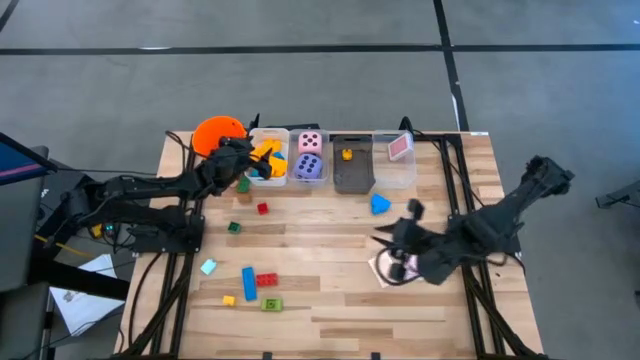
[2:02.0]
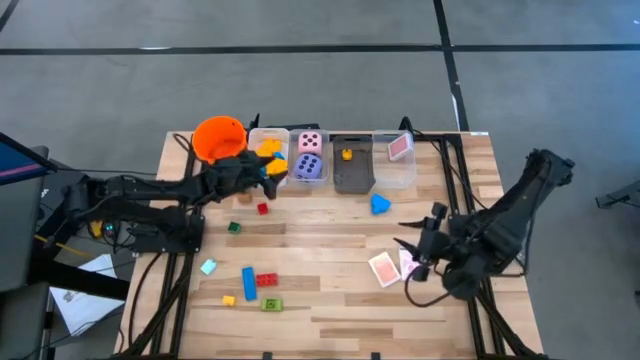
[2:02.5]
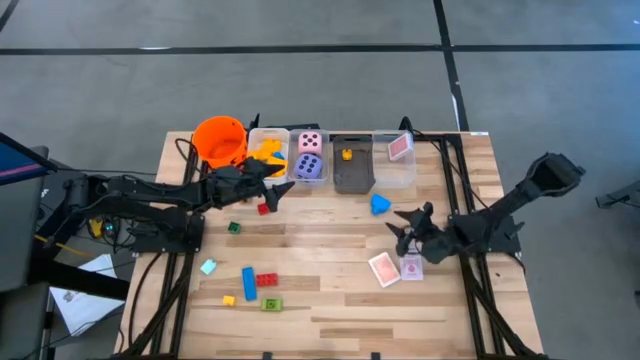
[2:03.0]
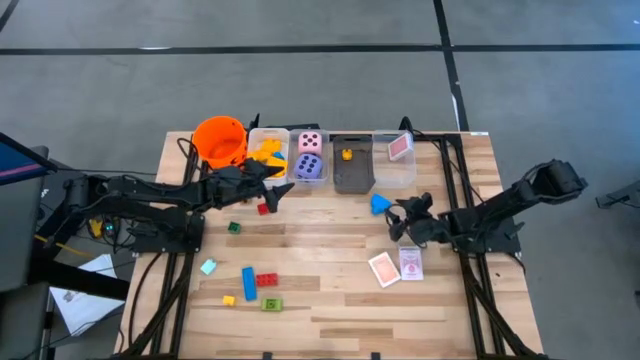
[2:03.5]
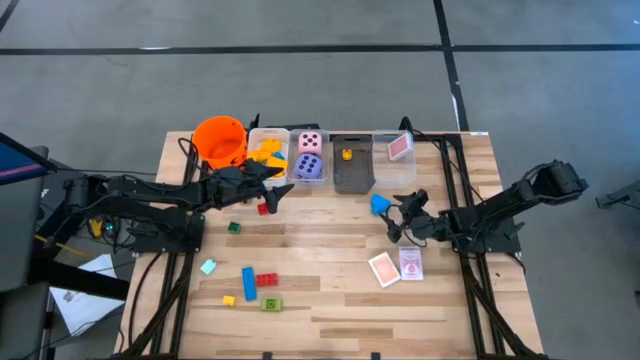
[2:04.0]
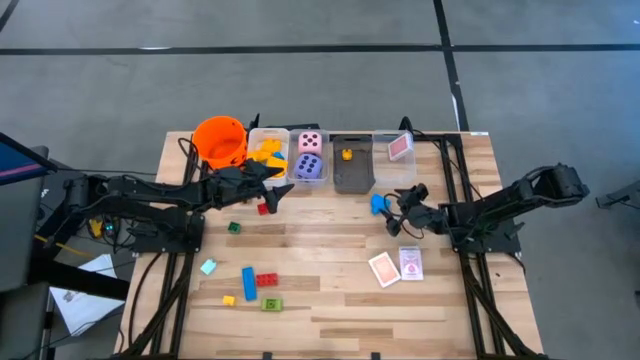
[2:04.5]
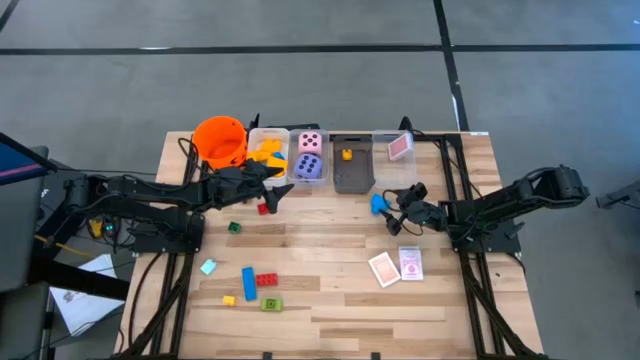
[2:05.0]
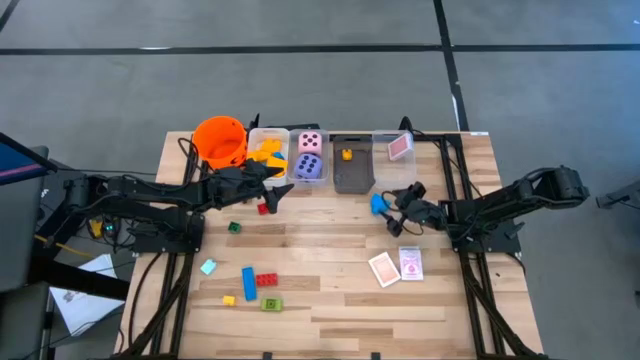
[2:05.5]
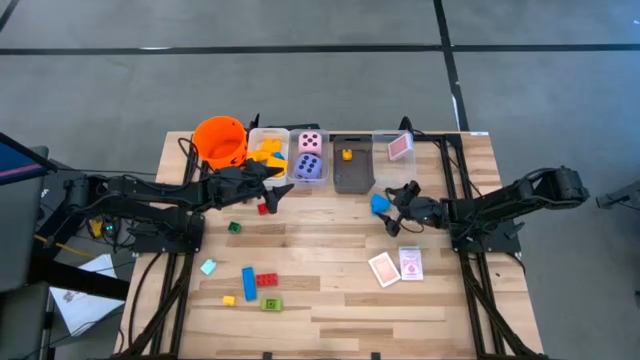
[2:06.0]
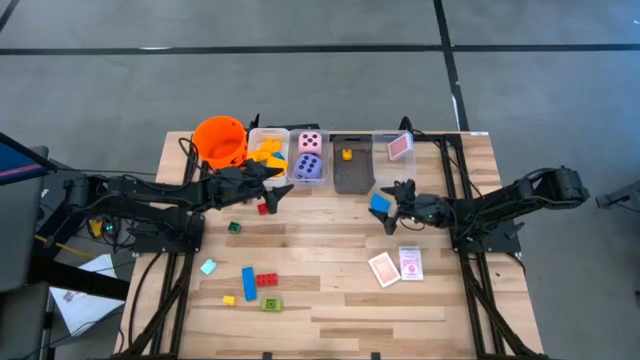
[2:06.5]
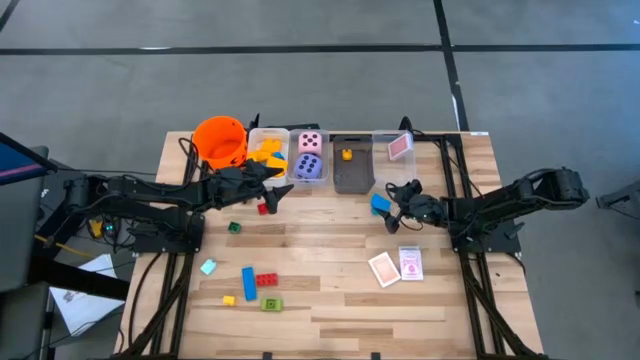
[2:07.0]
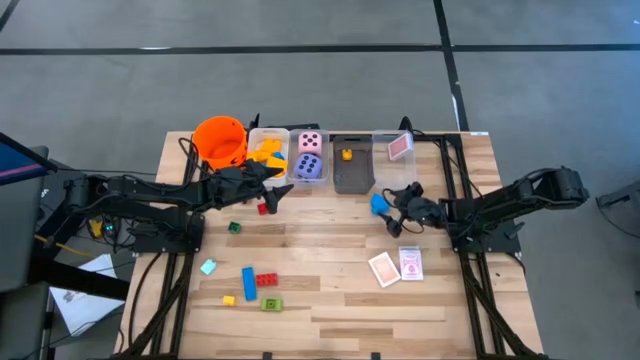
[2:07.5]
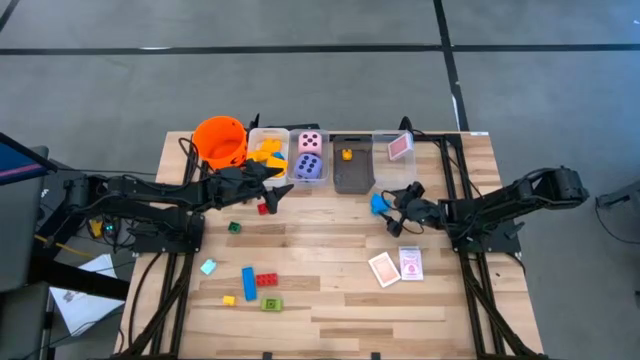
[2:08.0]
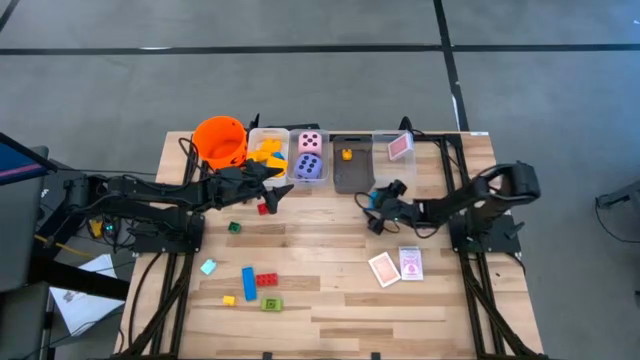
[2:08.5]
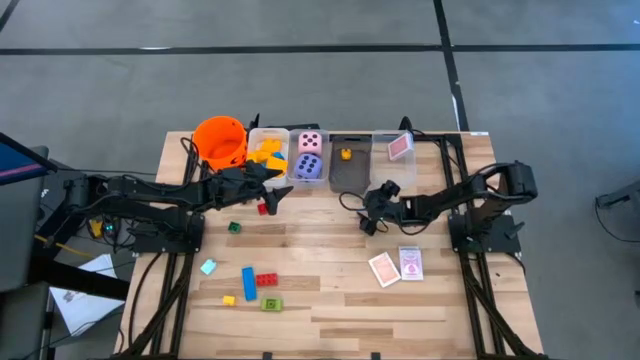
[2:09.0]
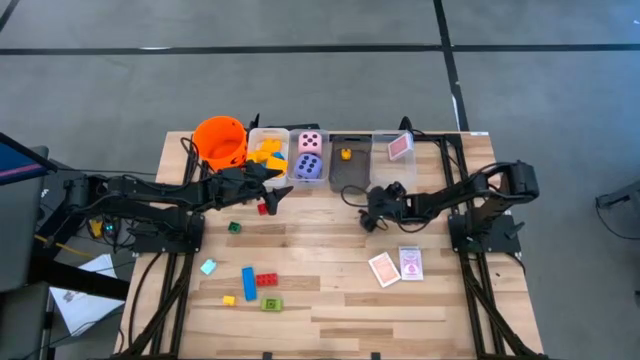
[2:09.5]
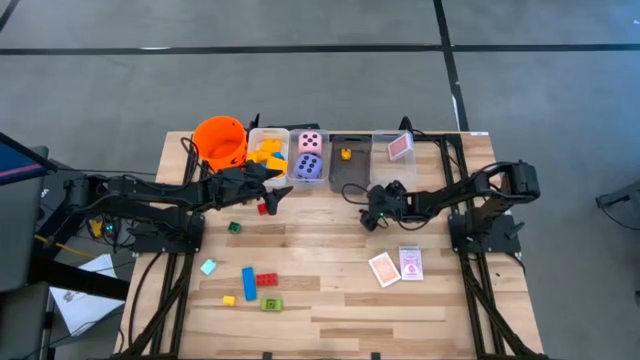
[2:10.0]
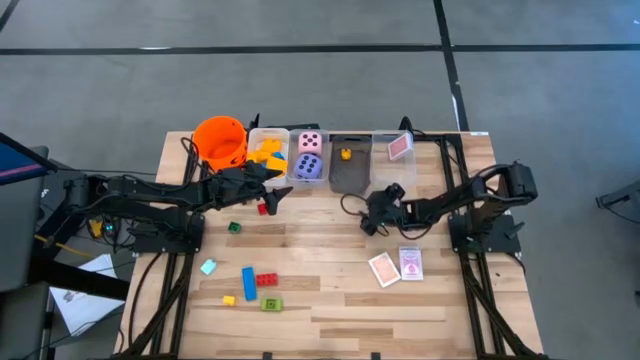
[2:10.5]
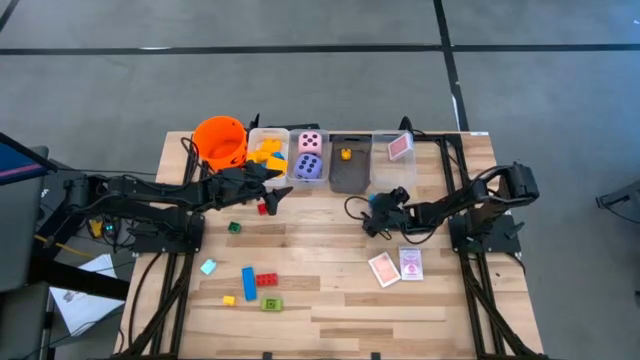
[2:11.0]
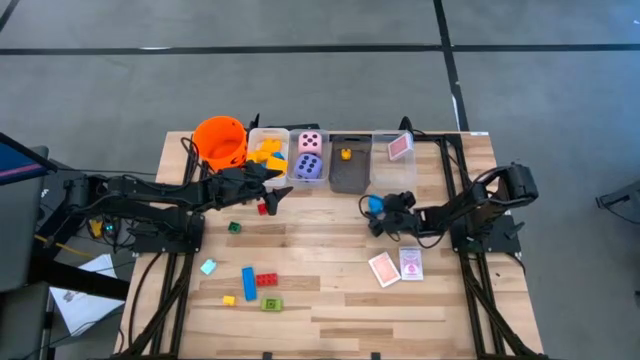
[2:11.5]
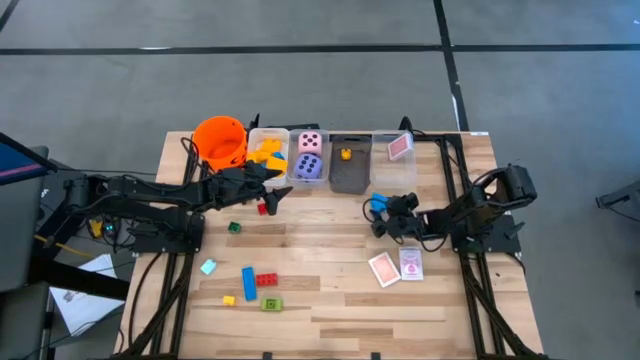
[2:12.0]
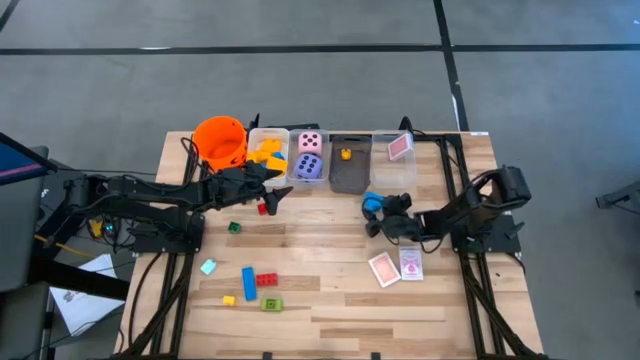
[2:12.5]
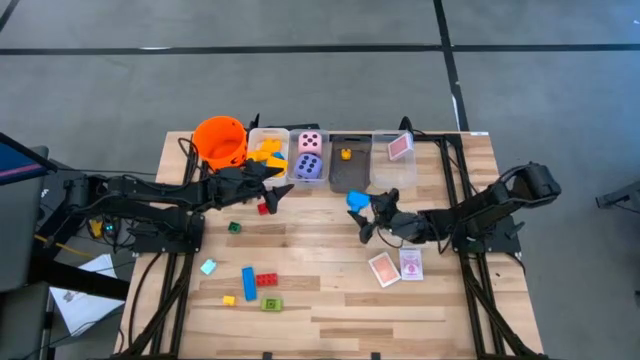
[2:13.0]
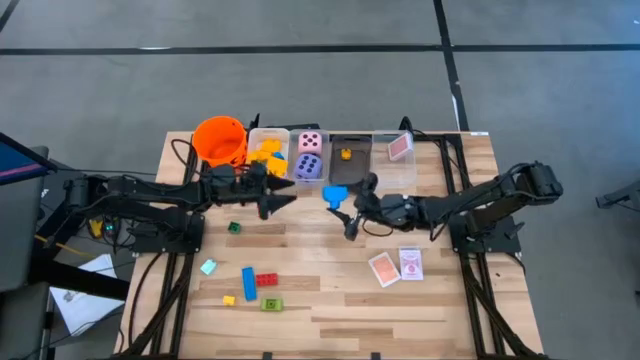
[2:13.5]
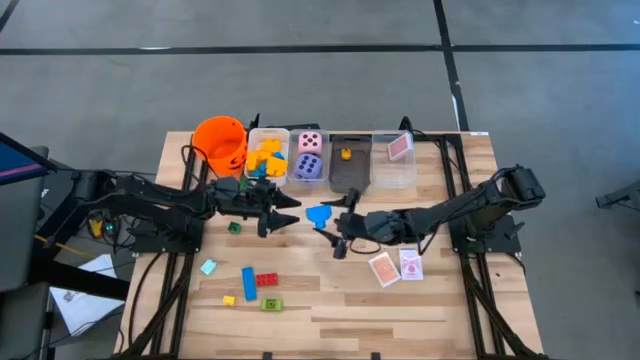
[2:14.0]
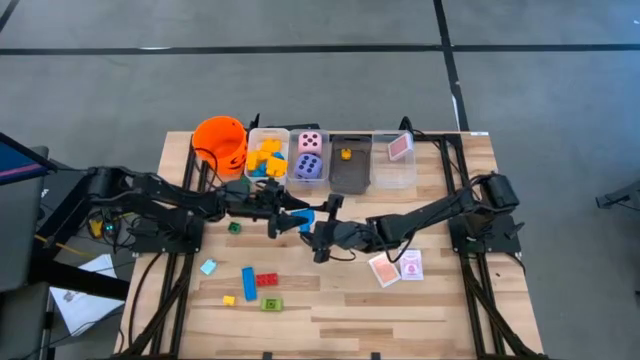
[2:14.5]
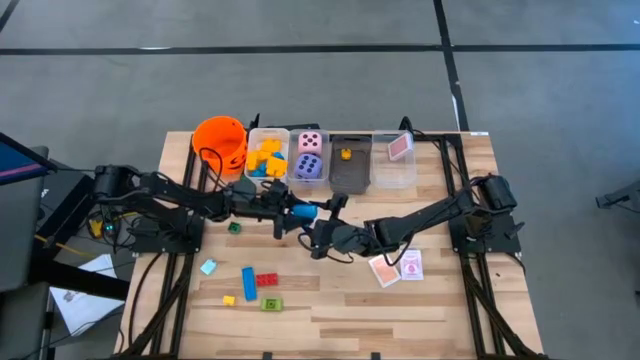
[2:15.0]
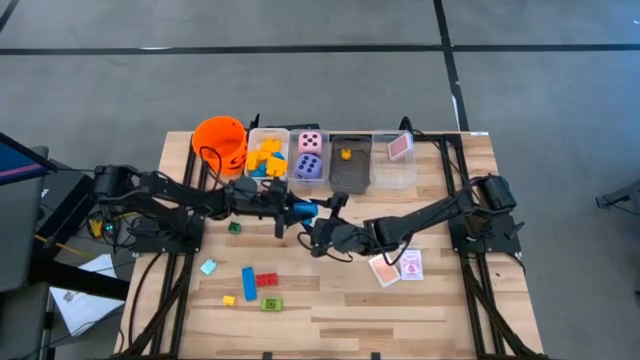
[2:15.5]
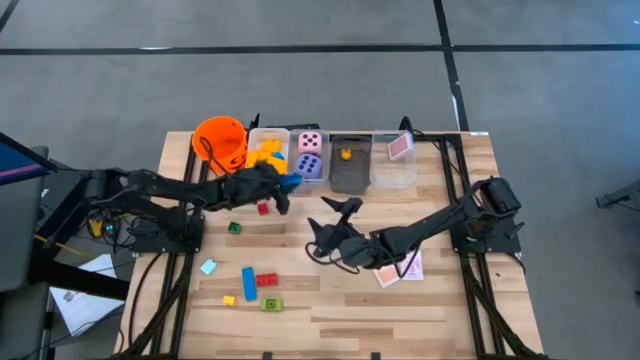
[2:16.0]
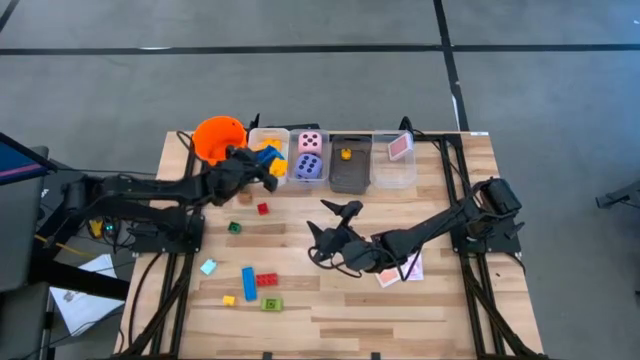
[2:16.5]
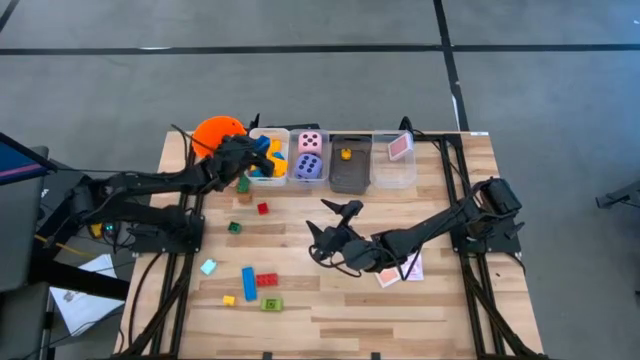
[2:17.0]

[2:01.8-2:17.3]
Task: Pick & Place Toys
Put the blue stud game piece into the white bin

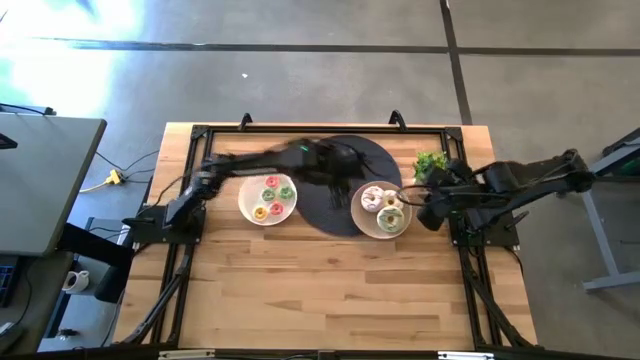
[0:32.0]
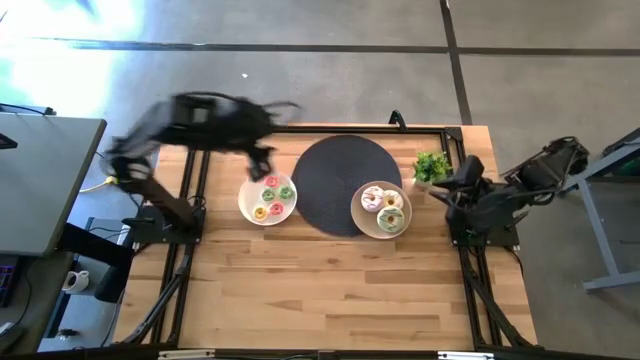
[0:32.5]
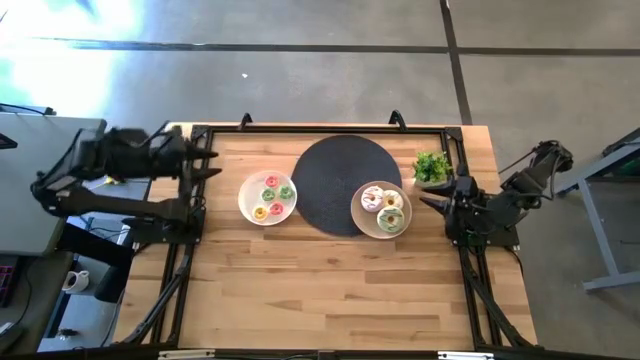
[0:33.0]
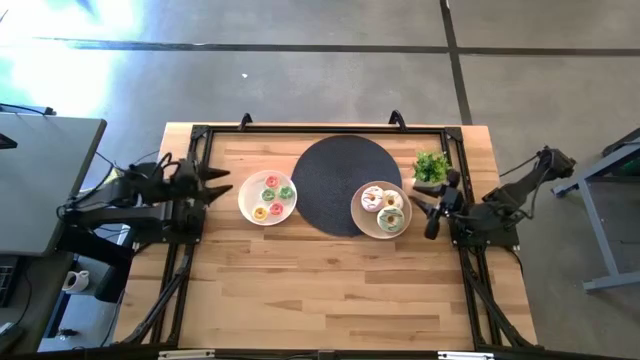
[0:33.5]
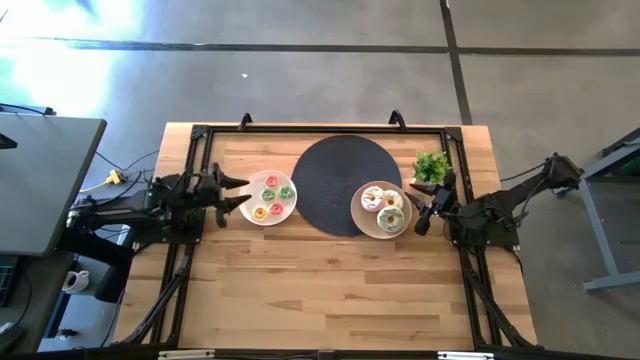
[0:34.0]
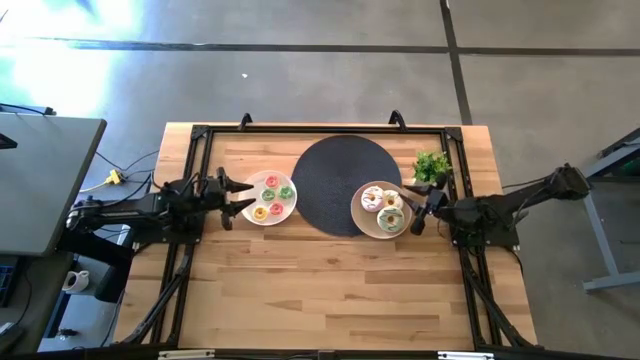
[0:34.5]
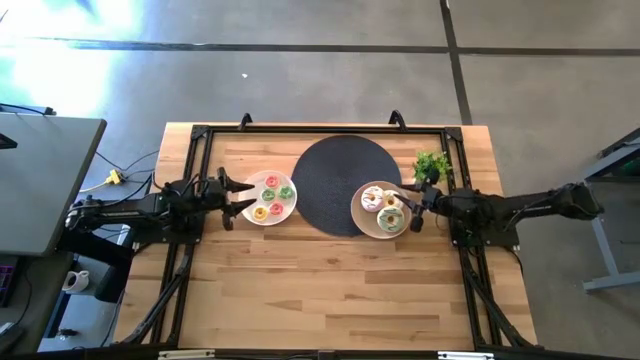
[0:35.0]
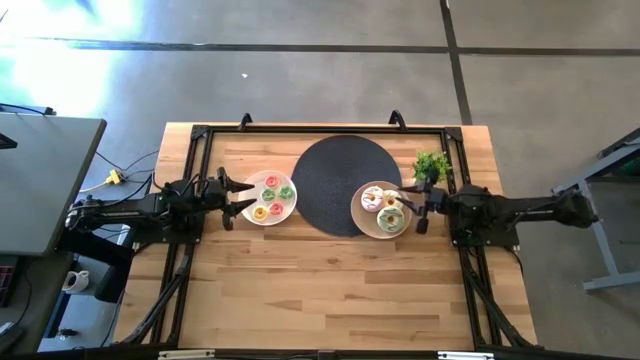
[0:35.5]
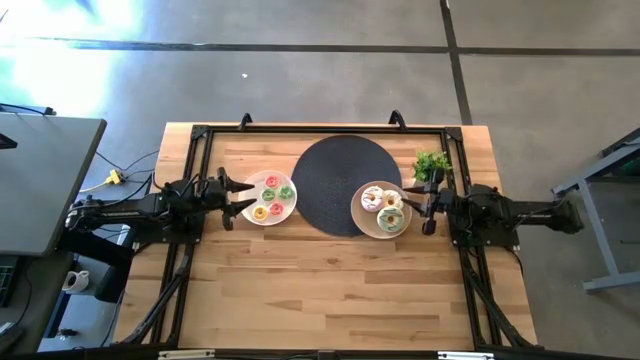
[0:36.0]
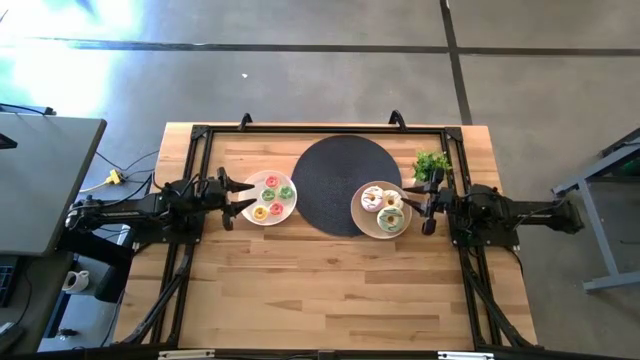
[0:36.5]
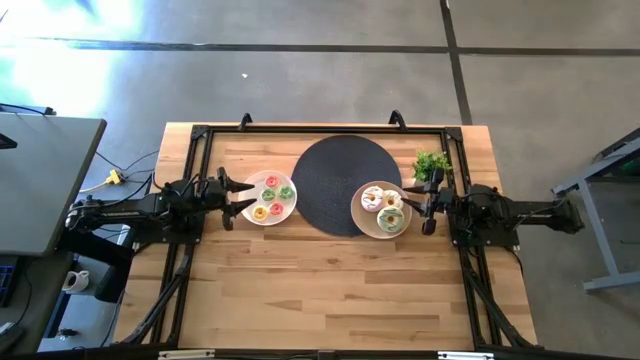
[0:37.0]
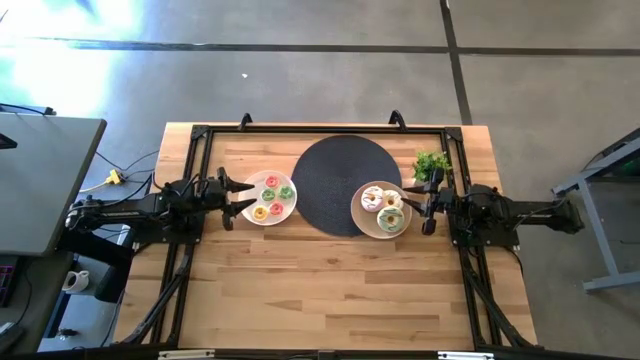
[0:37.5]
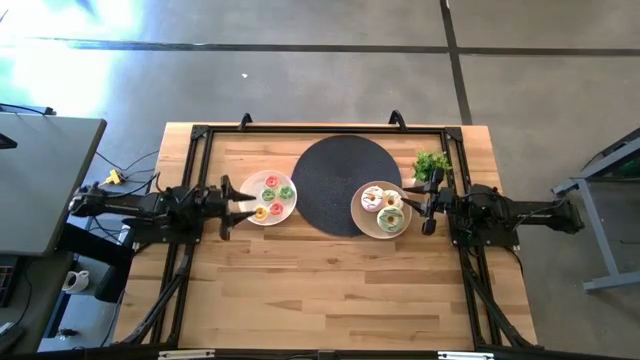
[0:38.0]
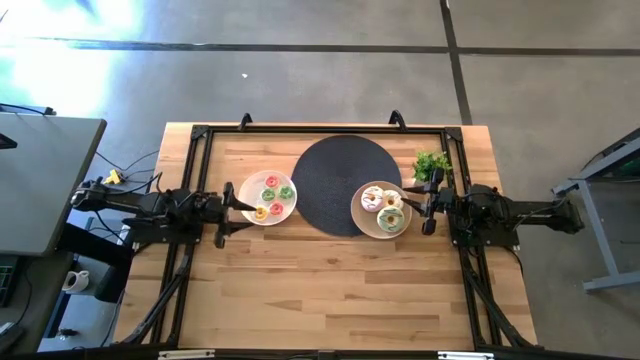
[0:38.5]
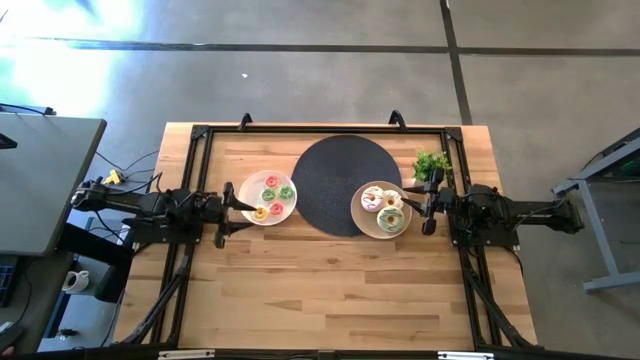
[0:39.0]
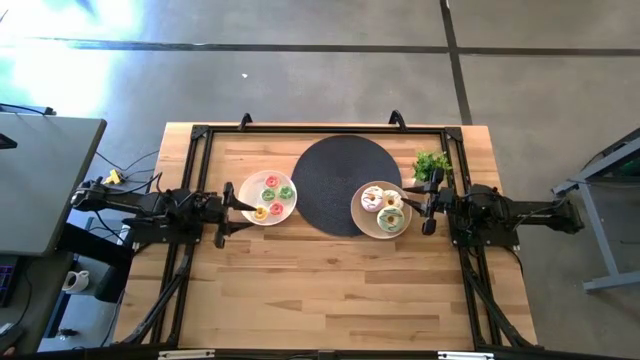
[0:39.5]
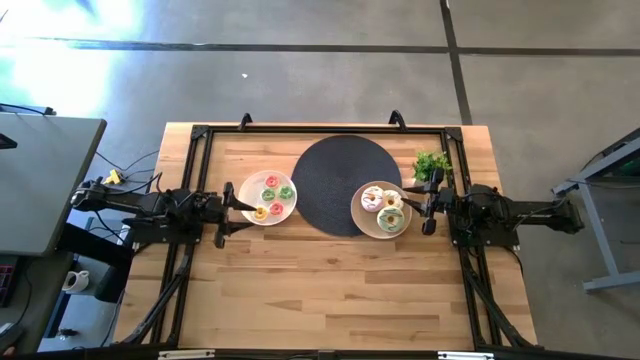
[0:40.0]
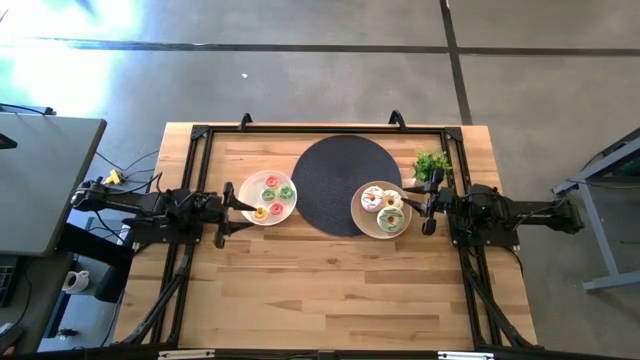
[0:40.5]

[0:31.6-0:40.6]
Task: Pick & Place donuts
Return to Home Position
